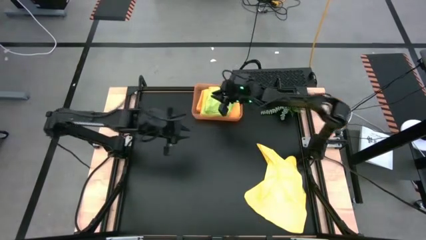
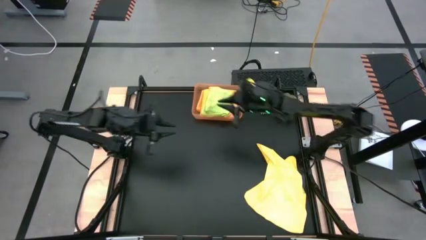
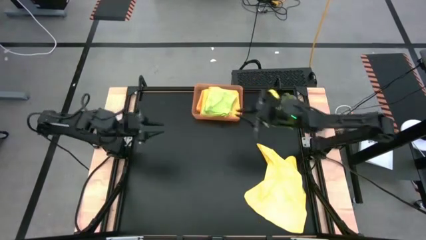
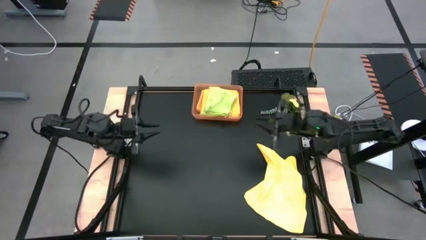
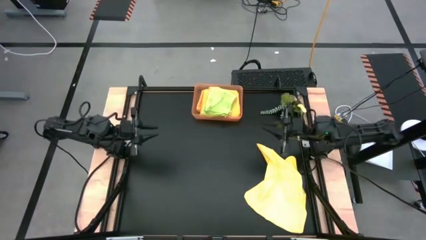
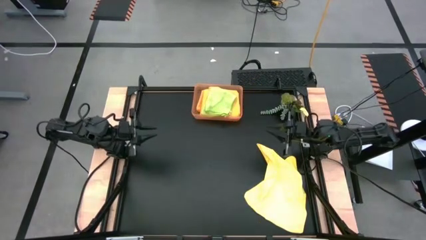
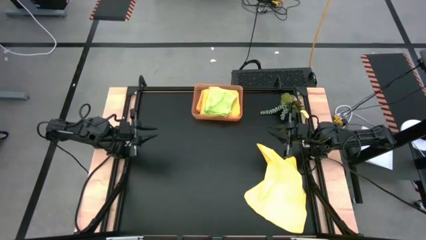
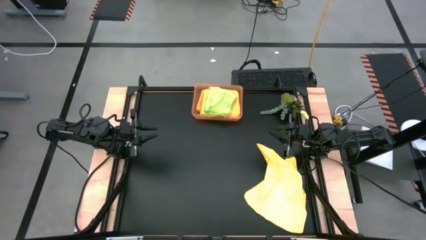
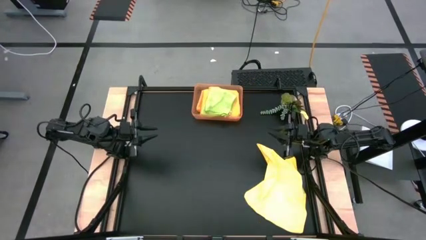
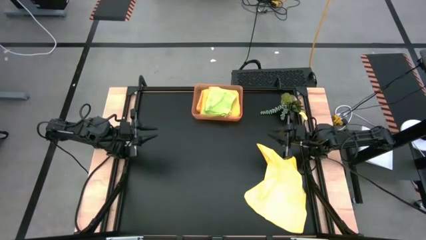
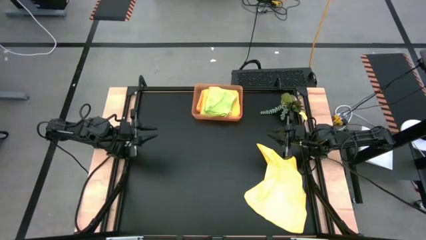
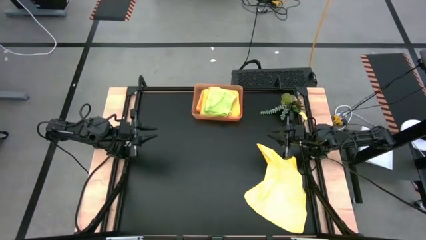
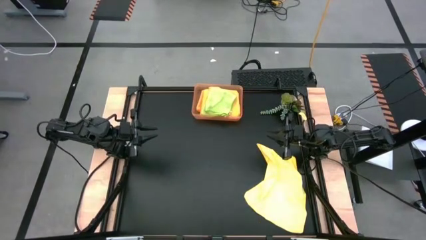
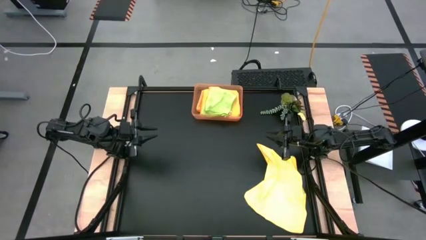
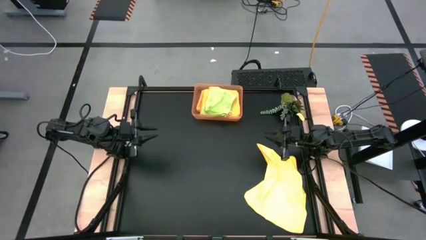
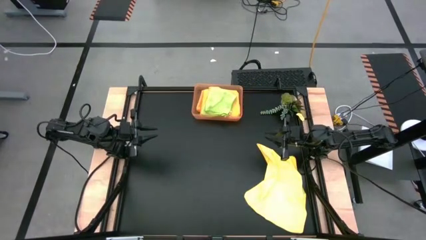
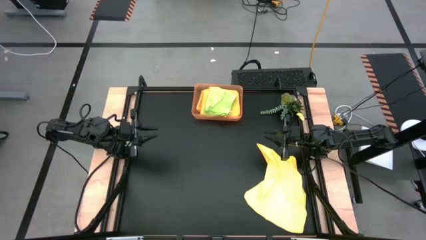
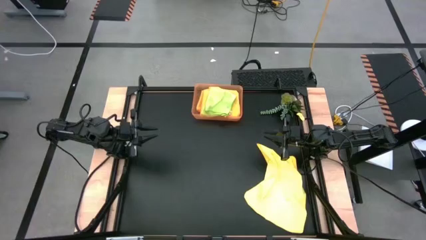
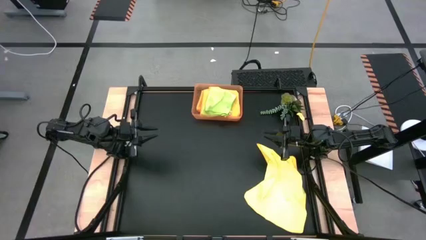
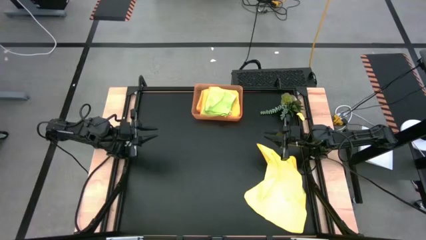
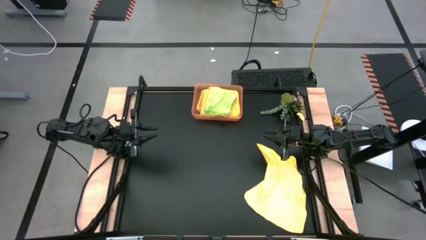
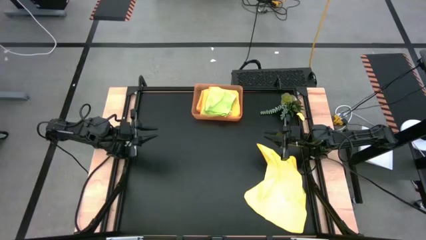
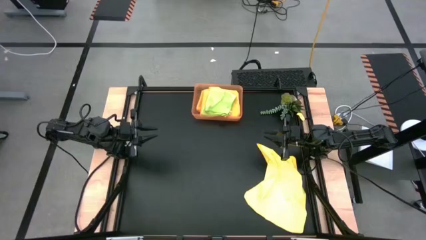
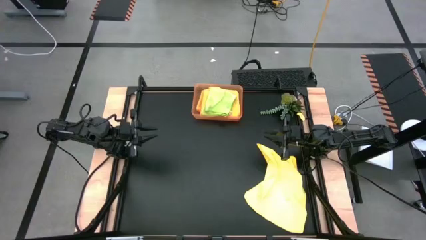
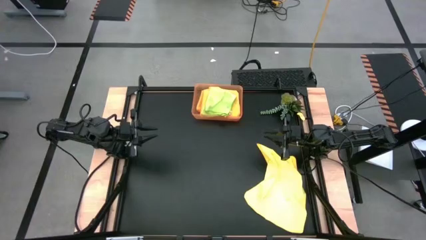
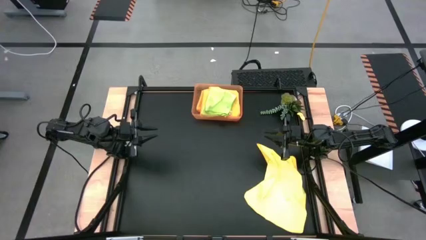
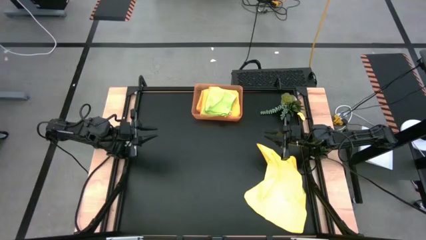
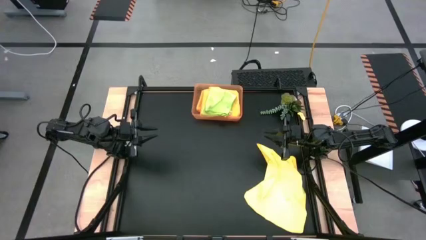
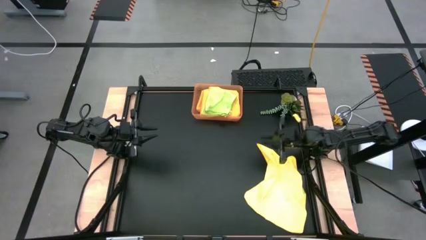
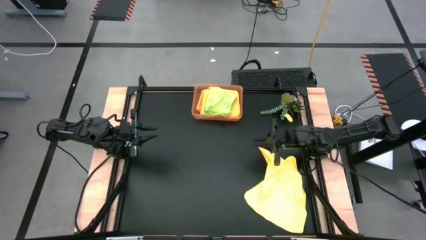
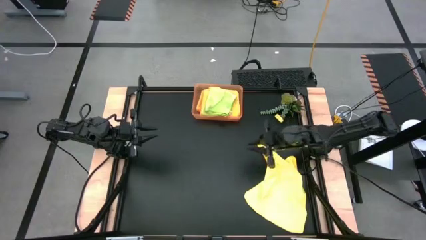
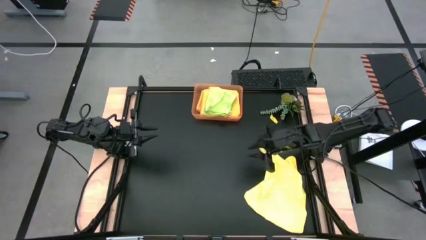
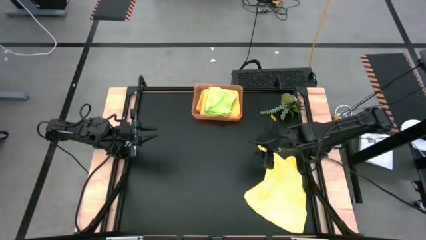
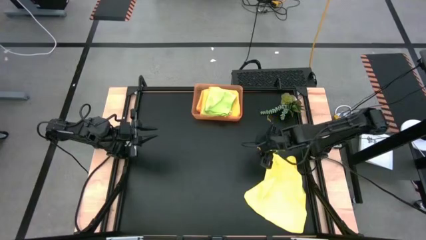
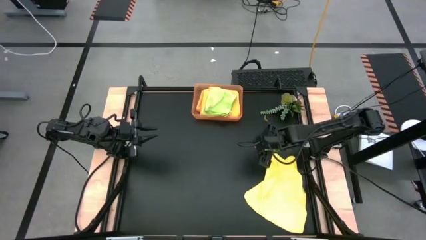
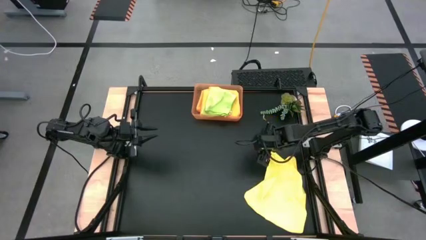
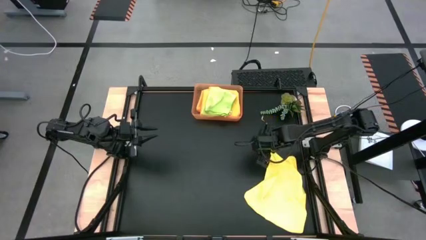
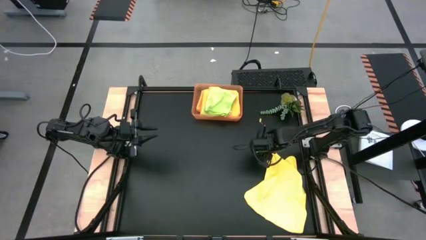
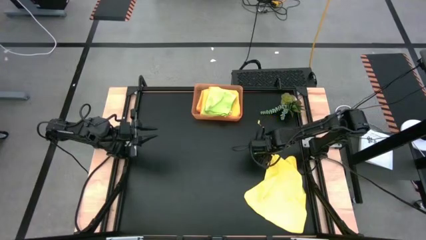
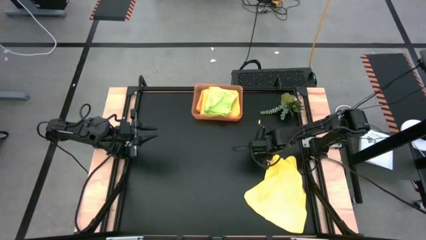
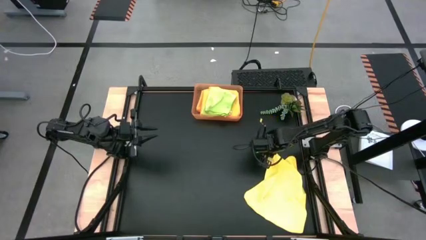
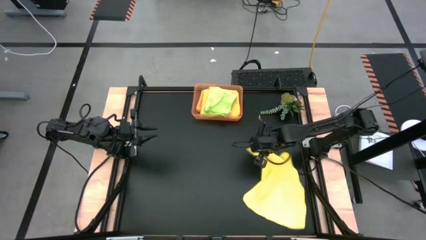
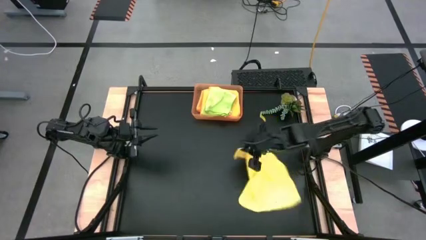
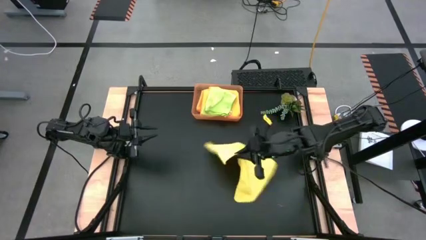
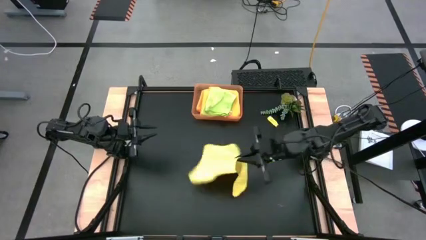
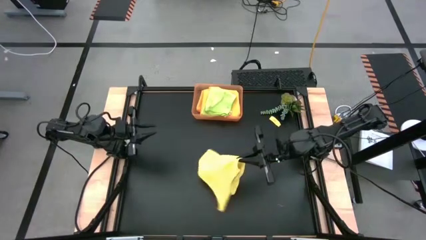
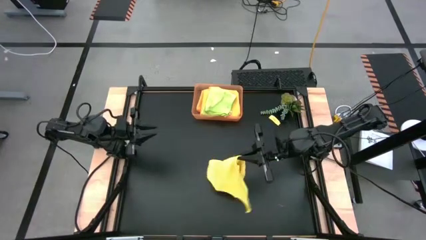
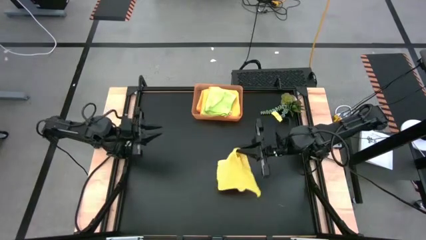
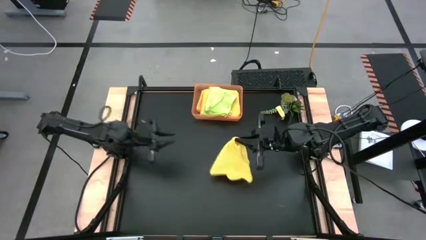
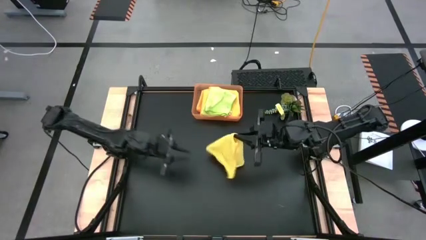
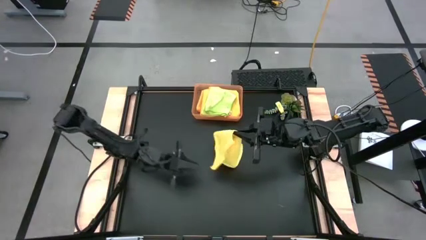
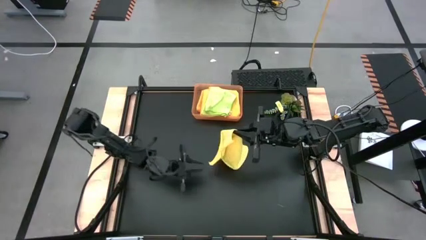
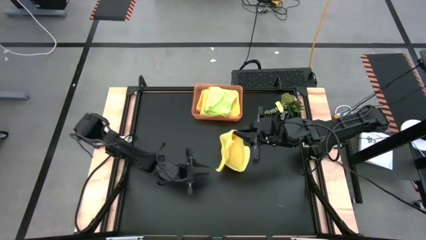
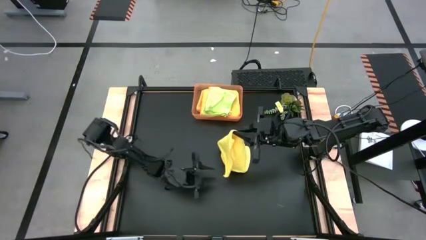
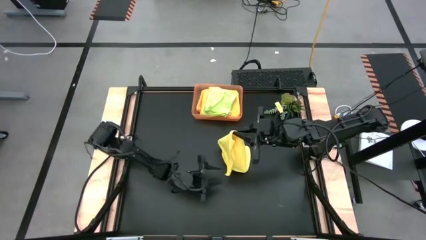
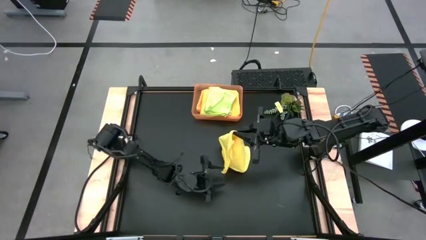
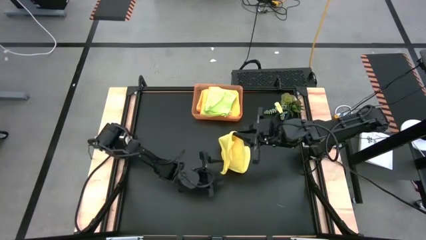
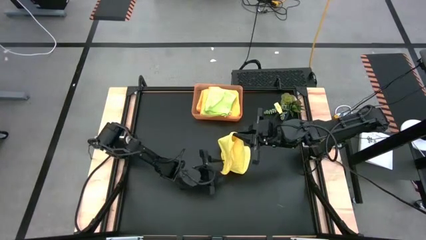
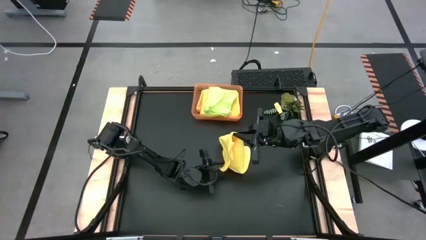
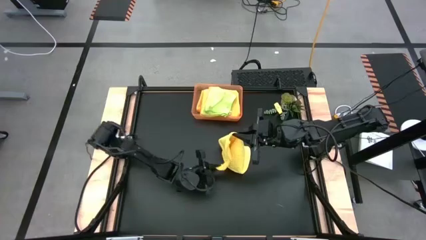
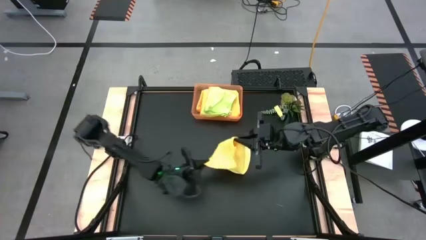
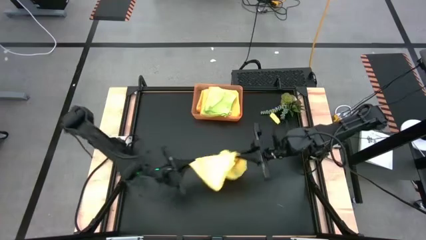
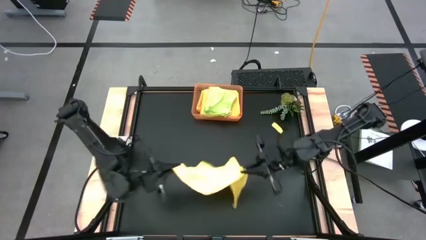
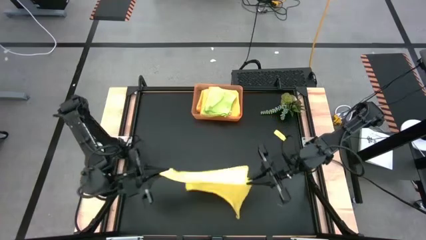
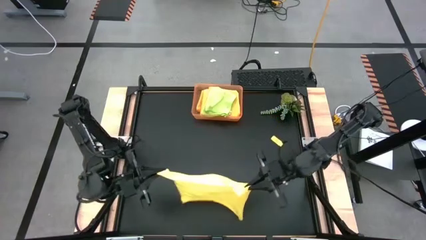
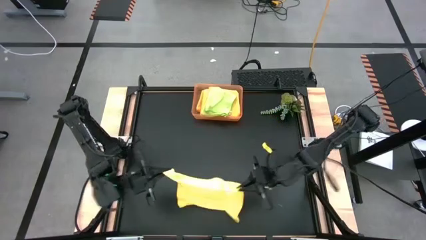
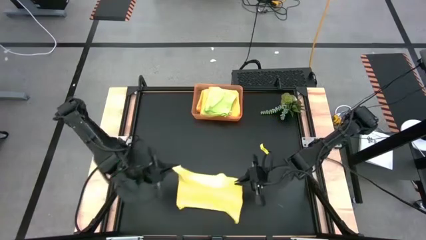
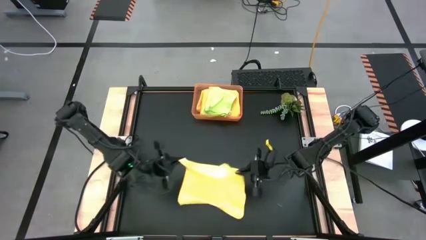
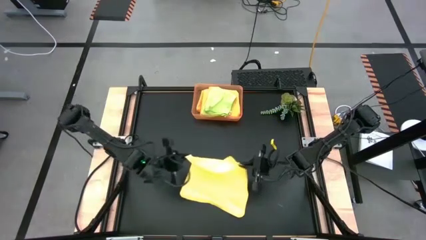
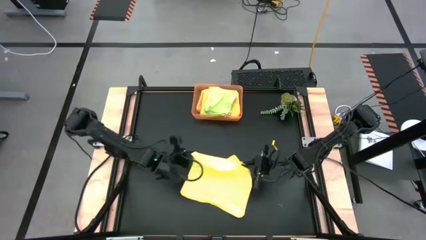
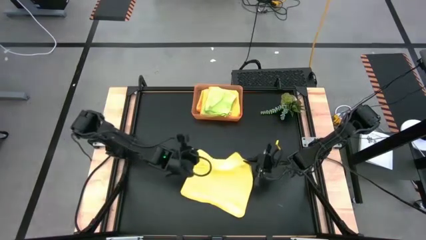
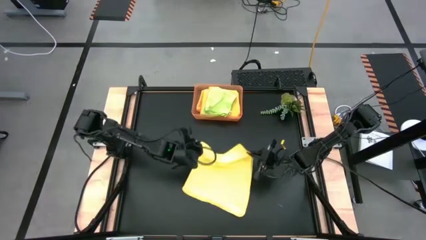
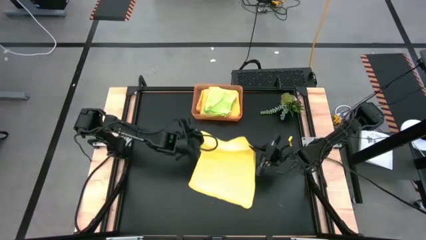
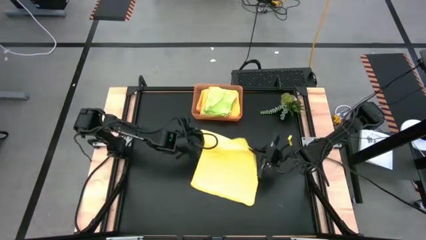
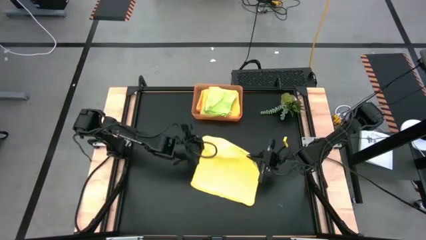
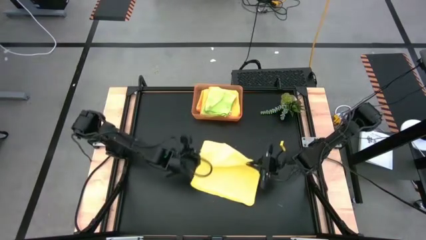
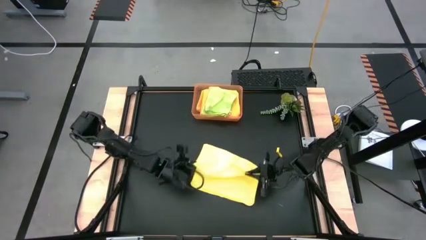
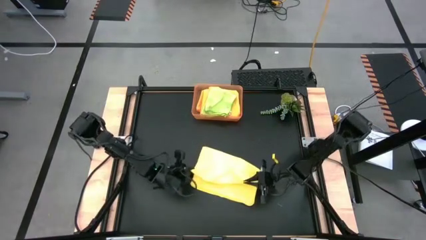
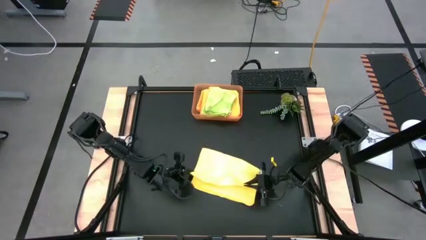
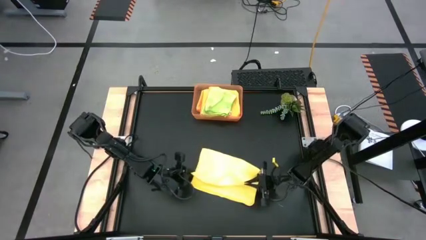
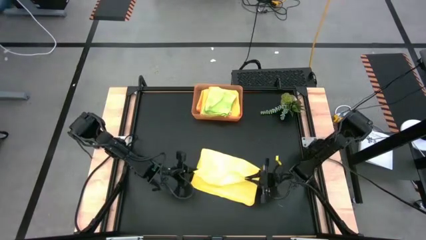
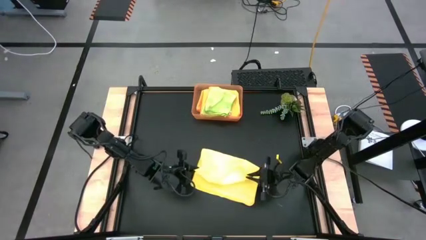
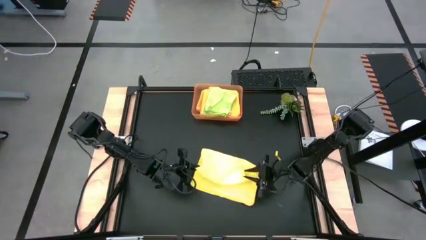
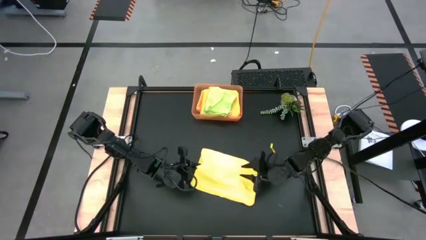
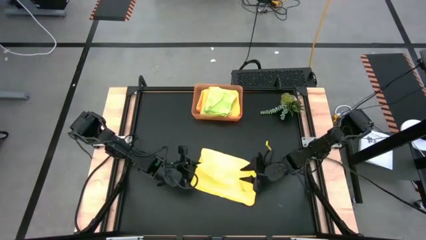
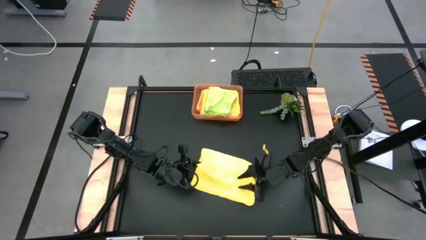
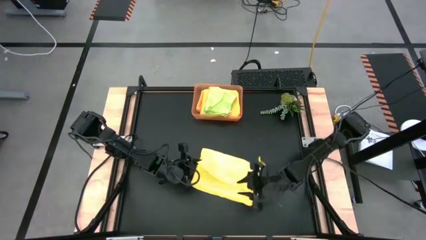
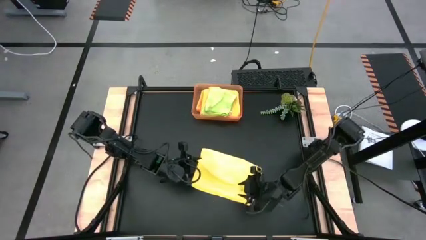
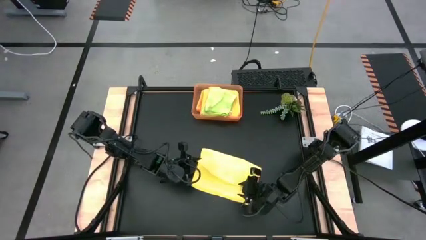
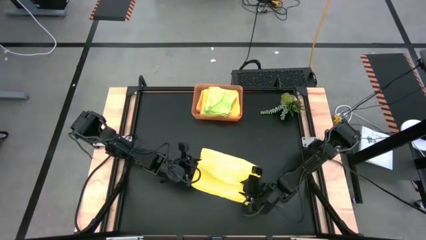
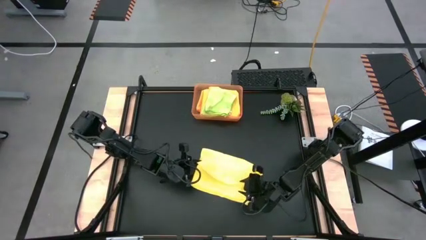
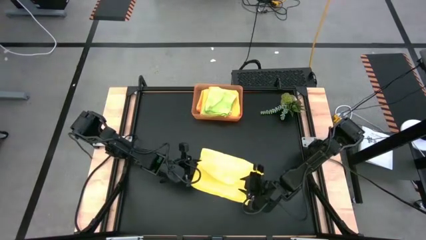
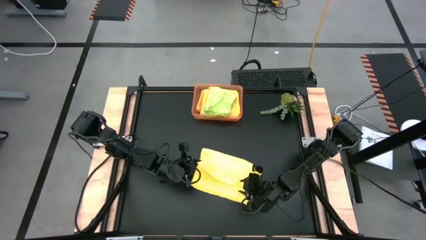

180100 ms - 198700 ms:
Task: Fold microfiber towels
Fold the yellow towel
